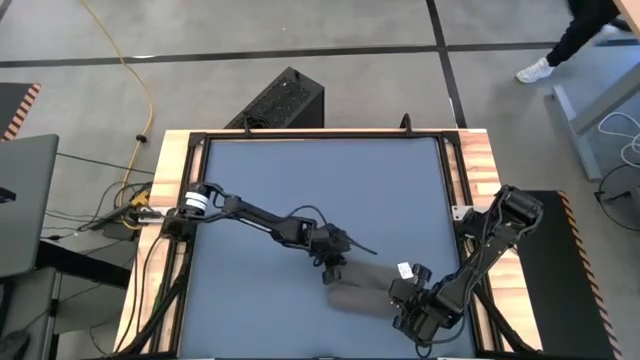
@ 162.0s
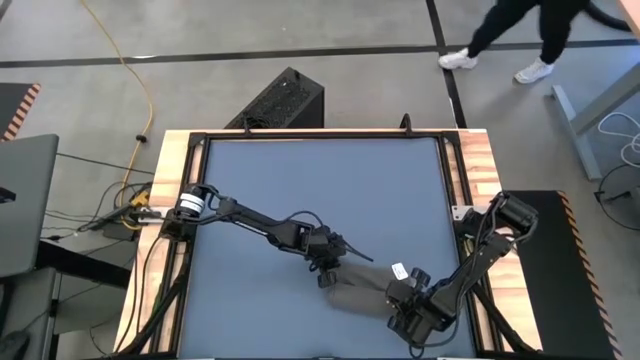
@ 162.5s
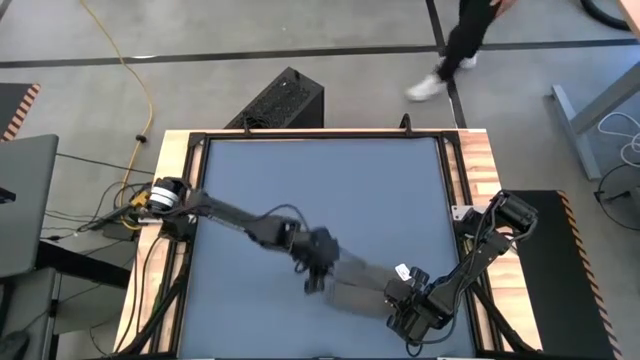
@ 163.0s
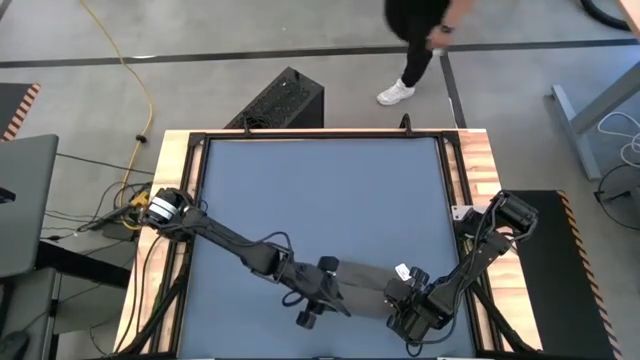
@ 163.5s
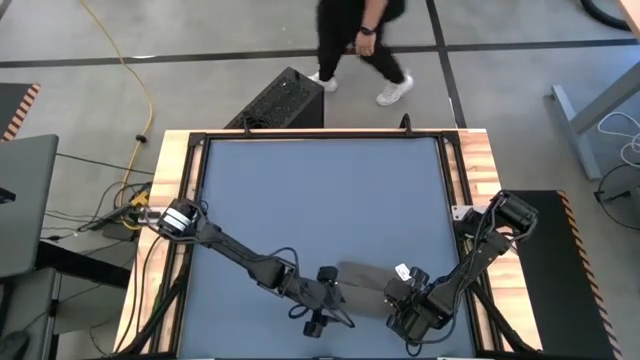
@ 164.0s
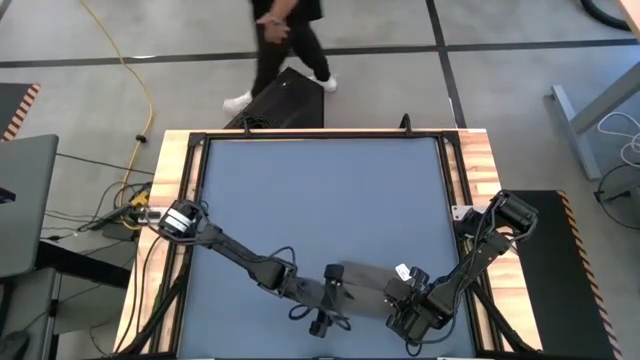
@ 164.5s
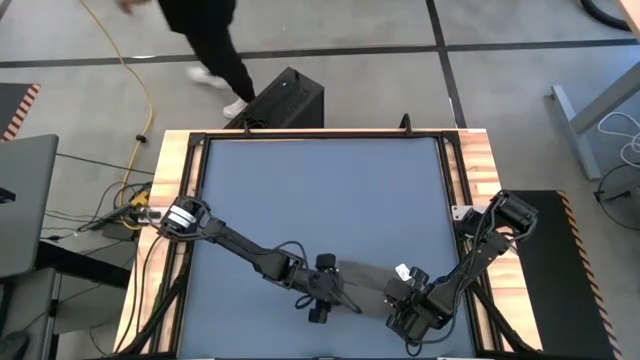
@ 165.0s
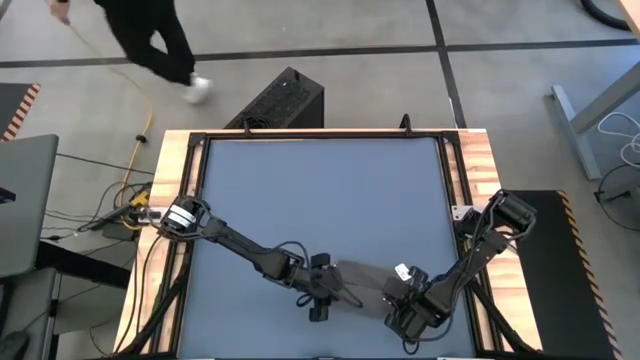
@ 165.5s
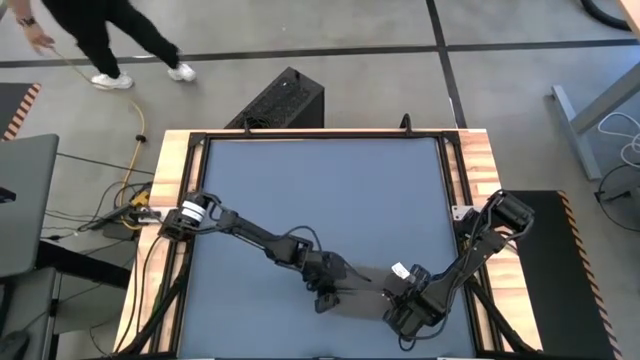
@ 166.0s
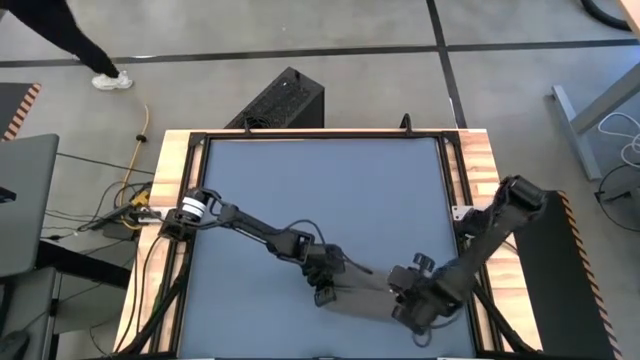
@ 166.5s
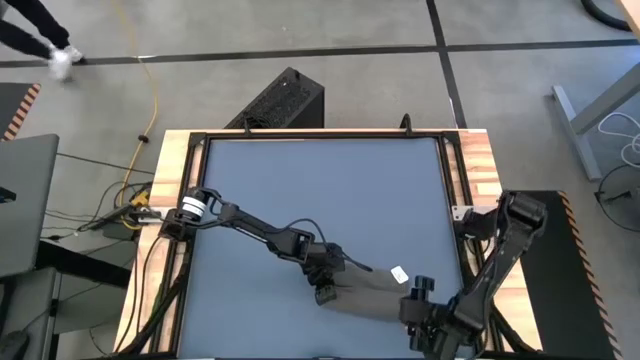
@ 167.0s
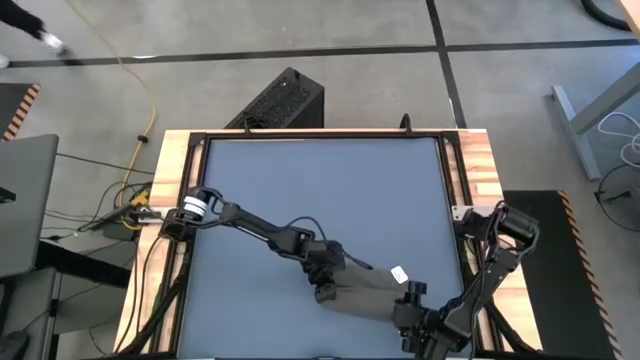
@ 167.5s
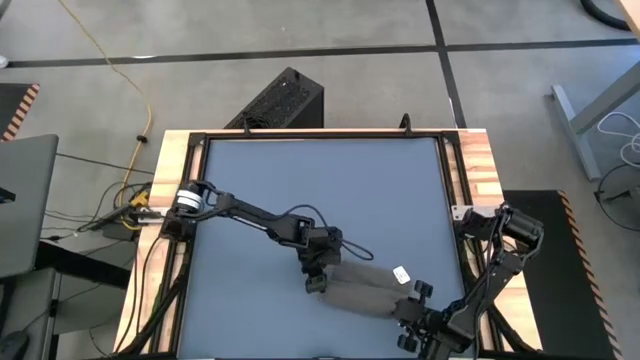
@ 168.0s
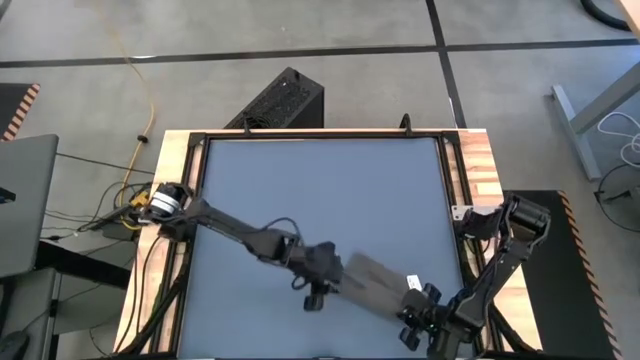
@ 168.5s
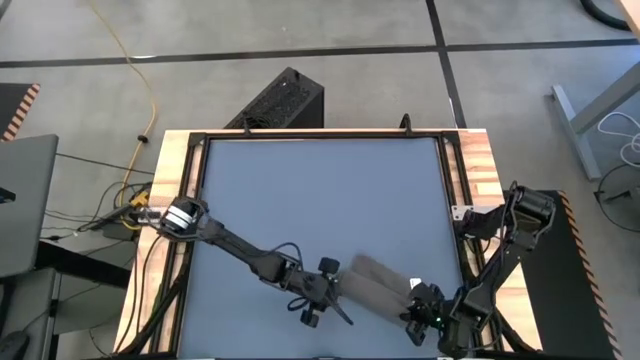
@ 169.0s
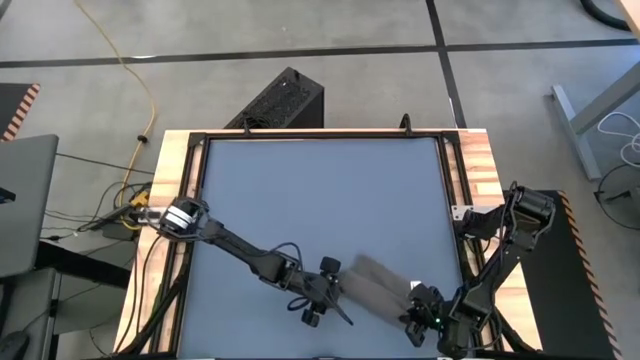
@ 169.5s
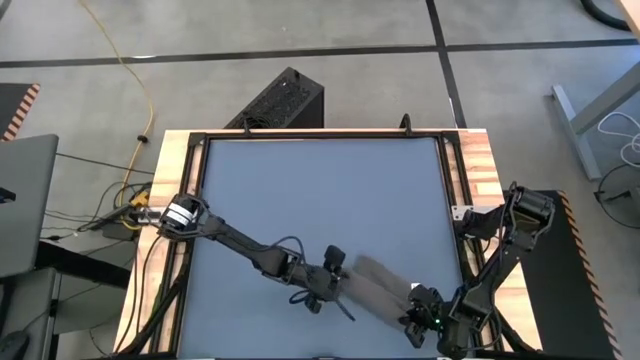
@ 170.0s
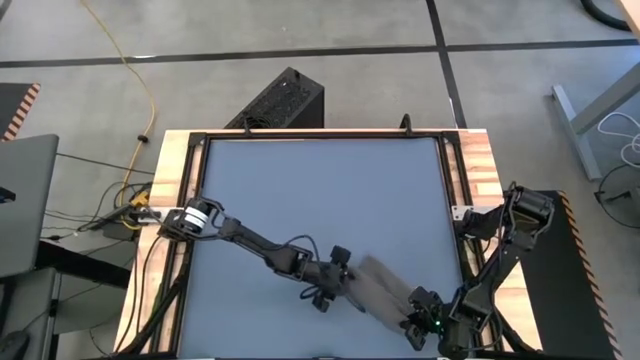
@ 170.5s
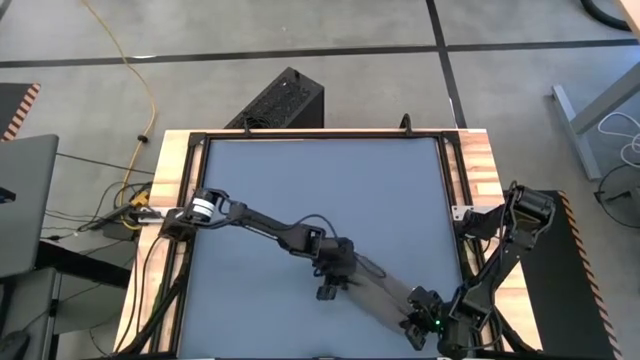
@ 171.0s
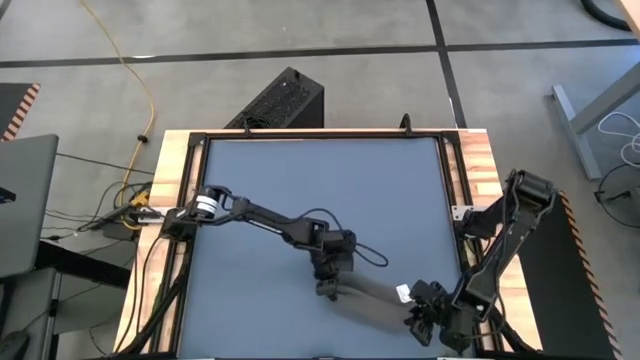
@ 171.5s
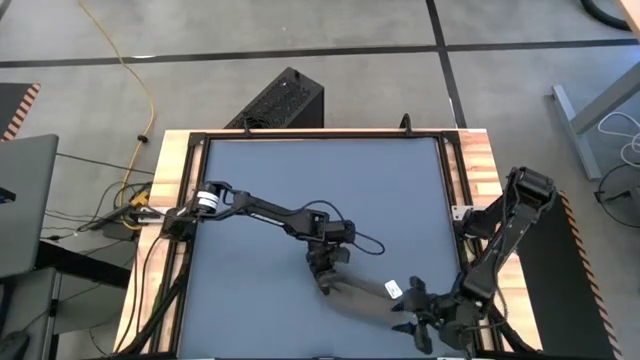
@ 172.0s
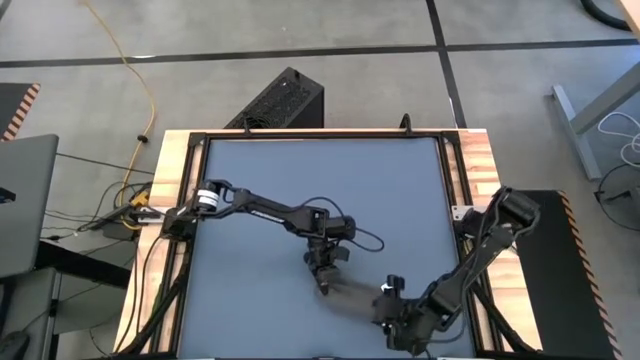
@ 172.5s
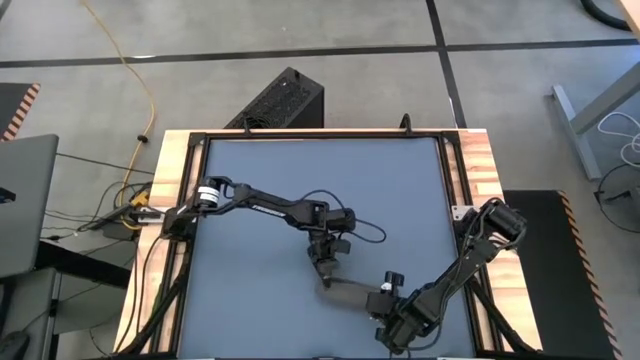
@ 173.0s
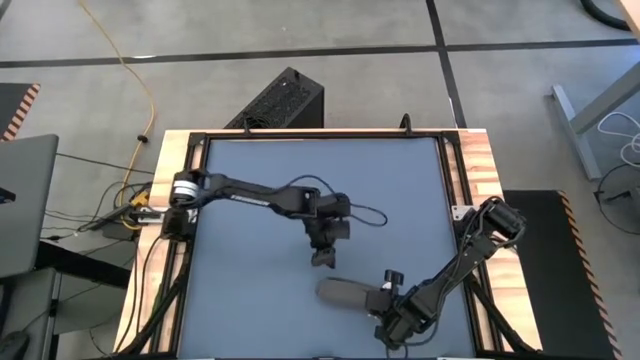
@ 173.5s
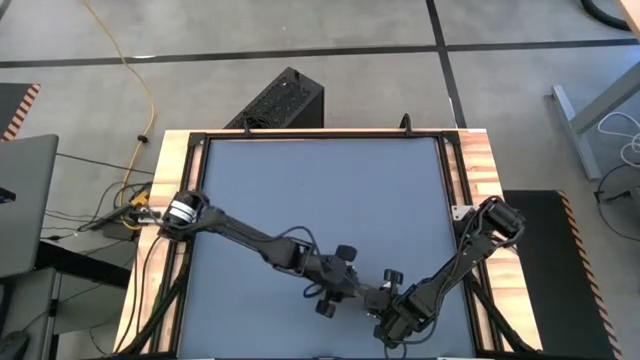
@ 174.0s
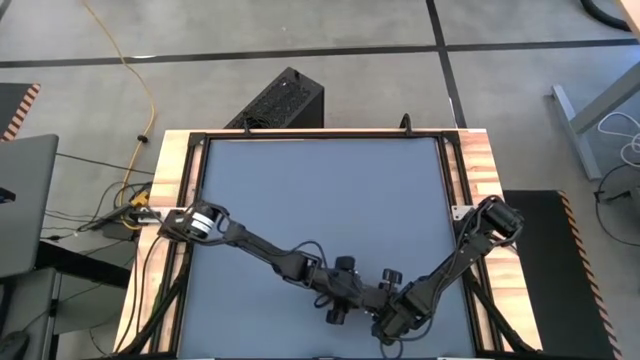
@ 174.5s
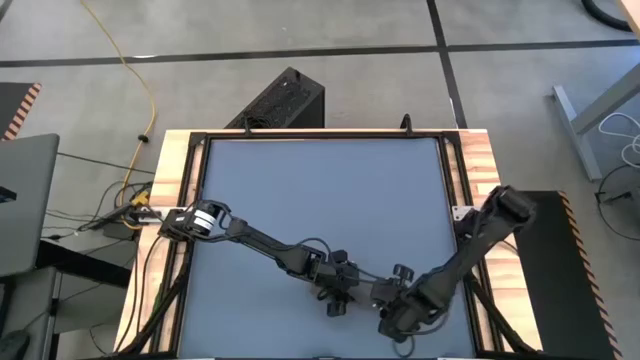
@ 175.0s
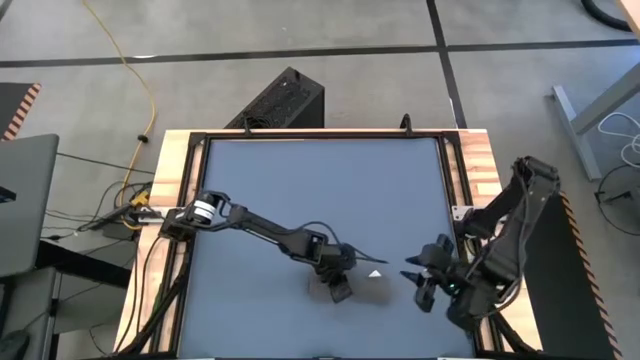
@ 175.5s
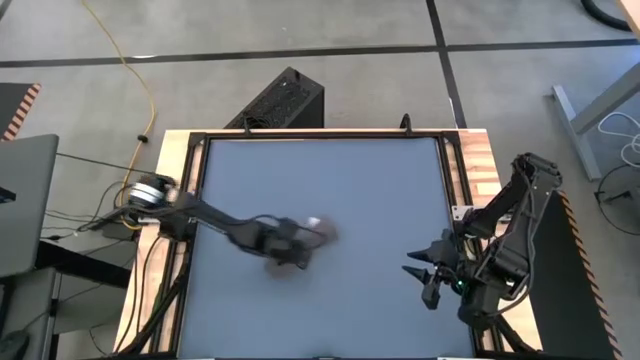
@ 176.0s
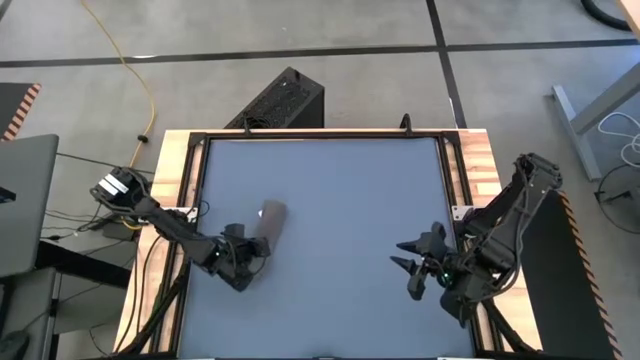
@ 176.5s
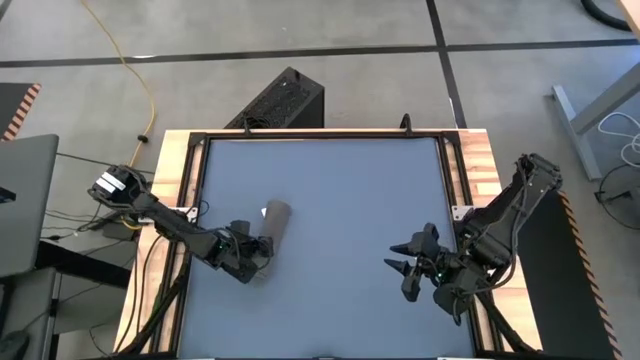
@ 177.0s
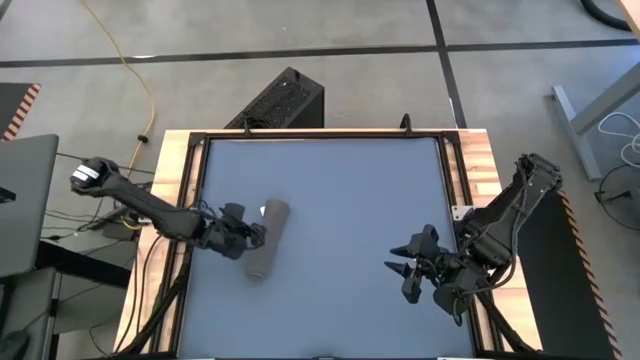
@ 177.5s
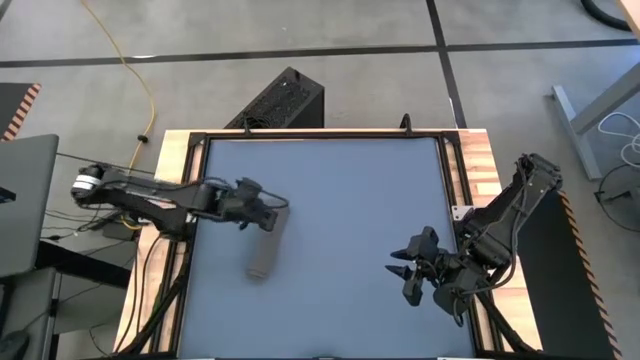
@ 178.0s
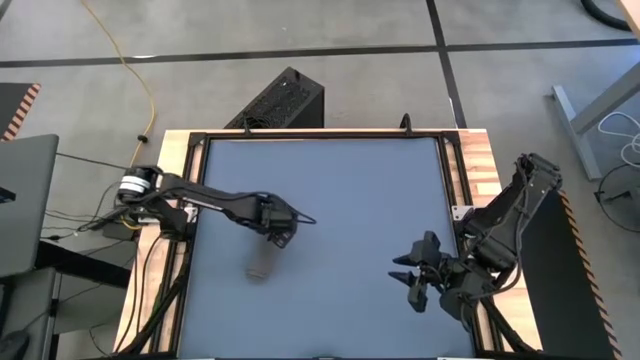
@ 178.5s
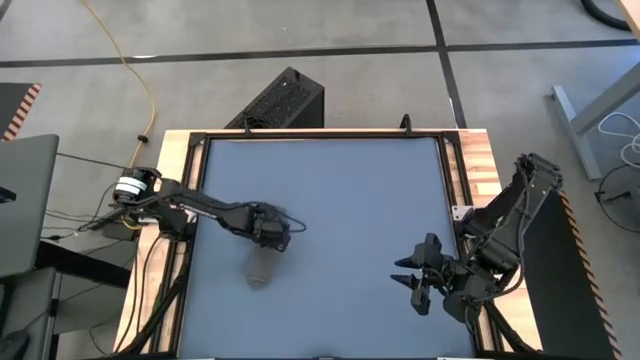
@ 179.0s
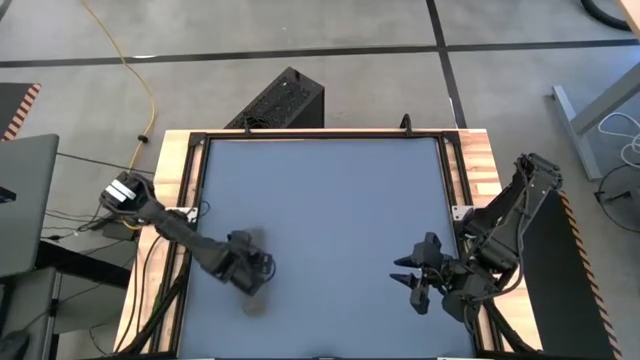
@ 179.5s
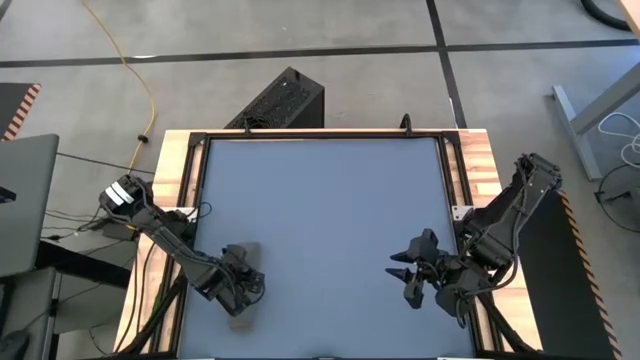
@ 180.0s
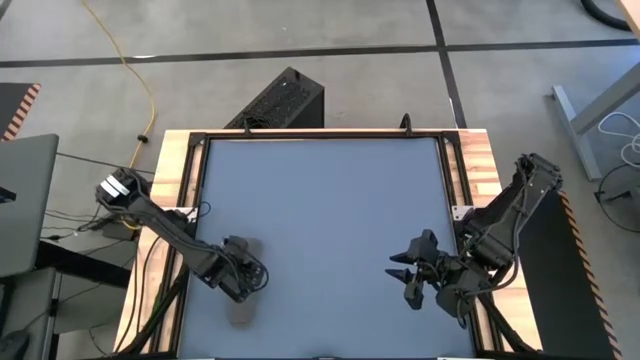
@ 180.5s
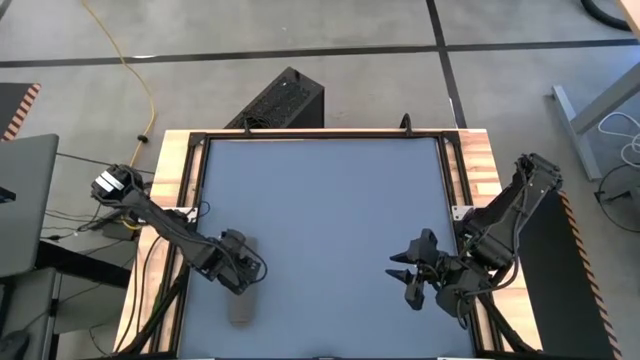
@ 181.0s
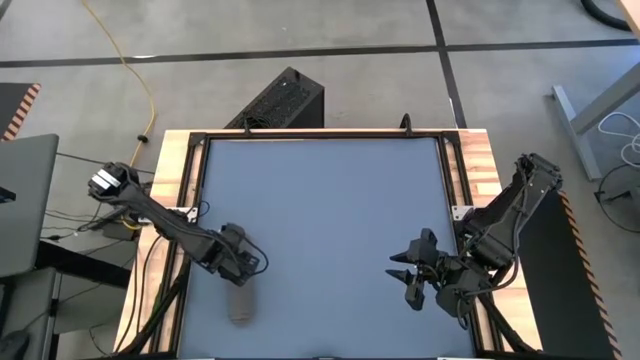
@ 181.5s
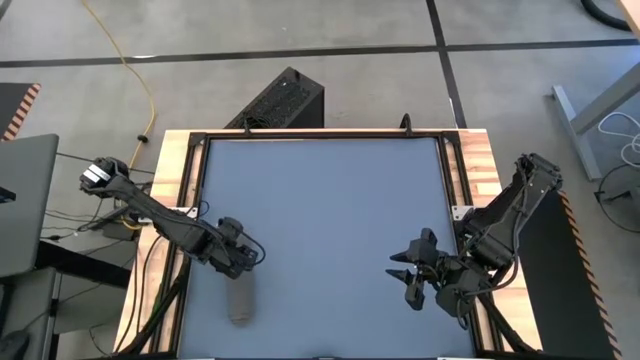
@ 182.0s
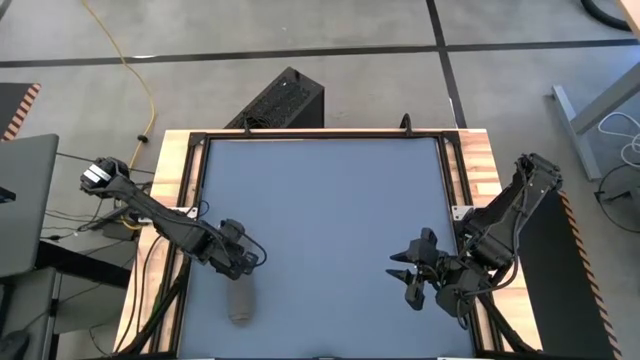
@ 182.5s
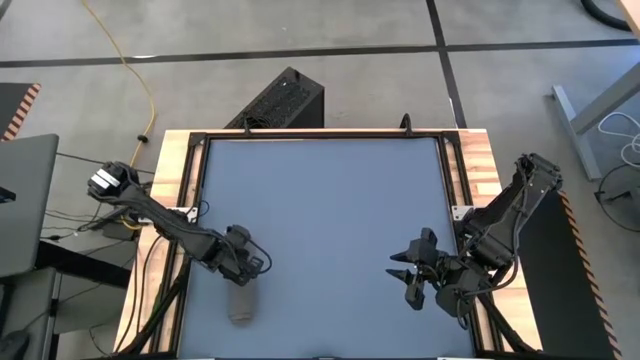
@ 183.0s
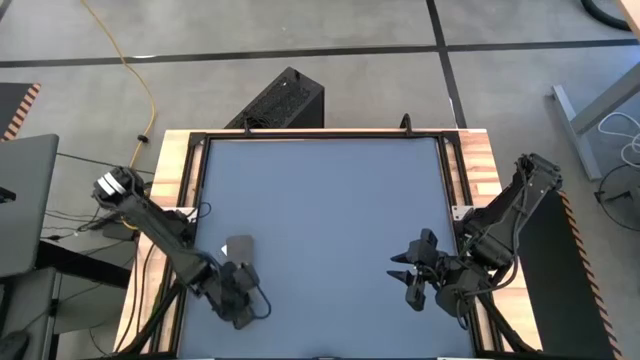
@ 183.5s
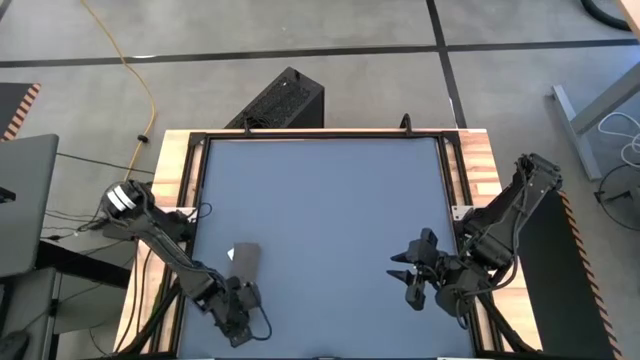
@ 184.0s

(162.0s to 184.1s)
Task: Roll towel
Roll the grey towel
